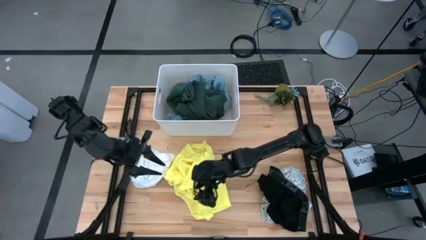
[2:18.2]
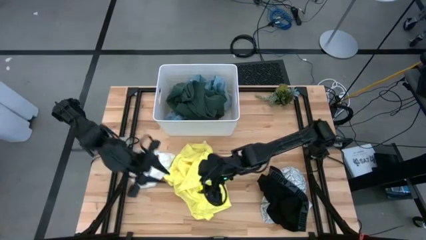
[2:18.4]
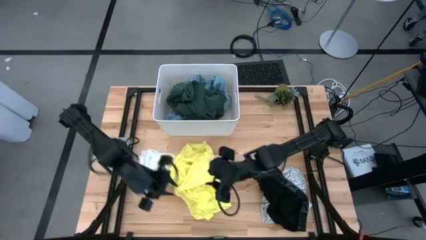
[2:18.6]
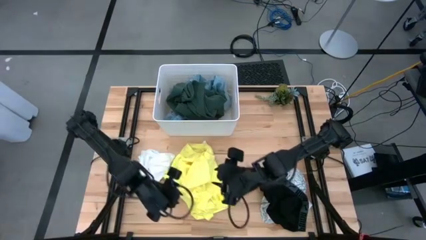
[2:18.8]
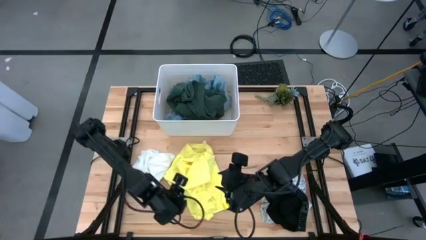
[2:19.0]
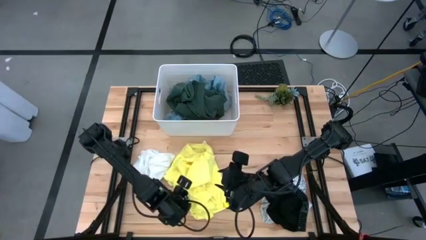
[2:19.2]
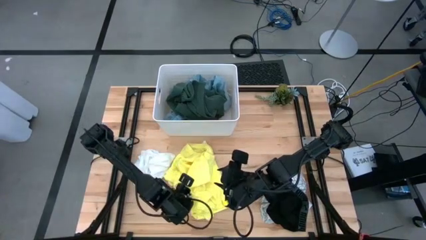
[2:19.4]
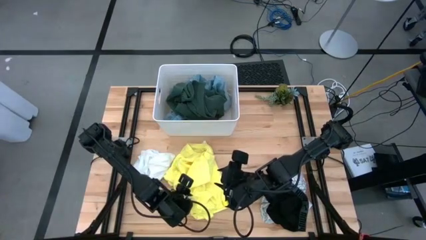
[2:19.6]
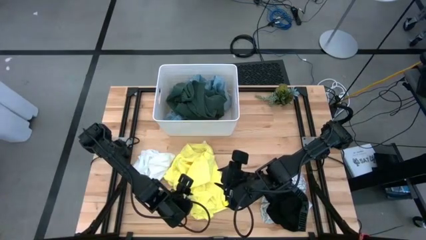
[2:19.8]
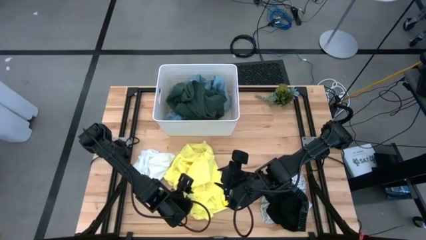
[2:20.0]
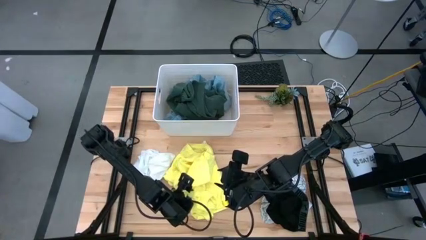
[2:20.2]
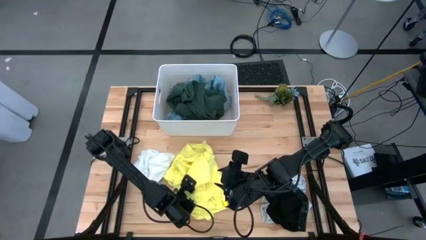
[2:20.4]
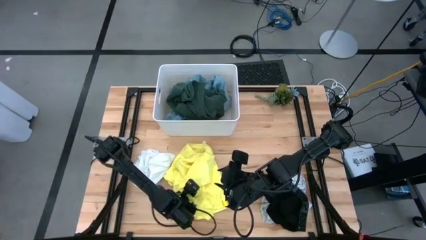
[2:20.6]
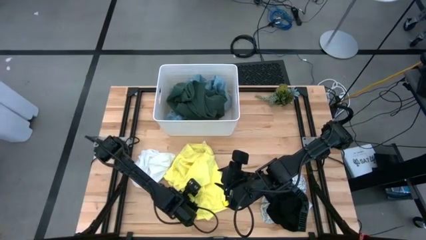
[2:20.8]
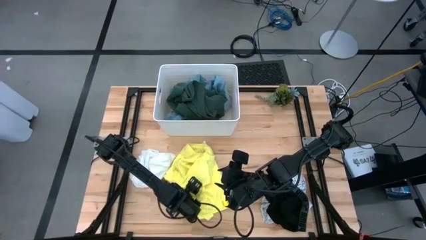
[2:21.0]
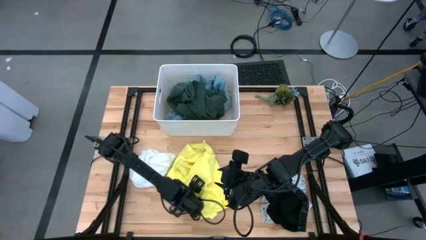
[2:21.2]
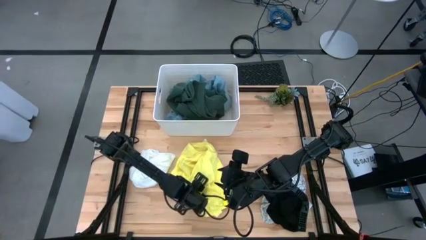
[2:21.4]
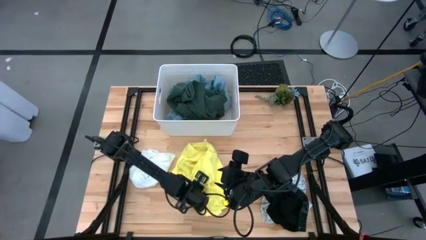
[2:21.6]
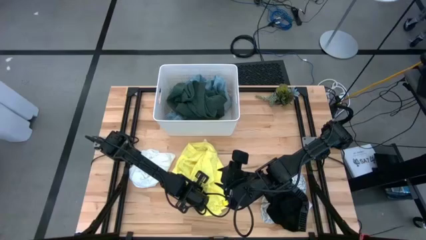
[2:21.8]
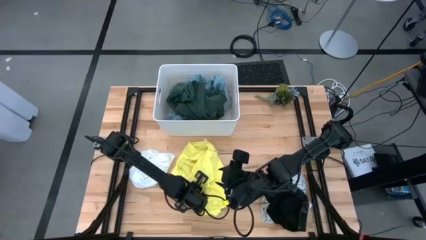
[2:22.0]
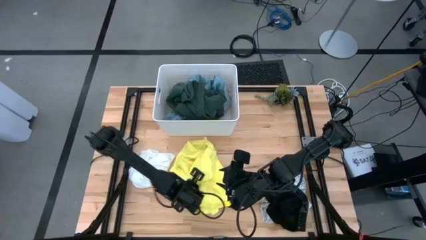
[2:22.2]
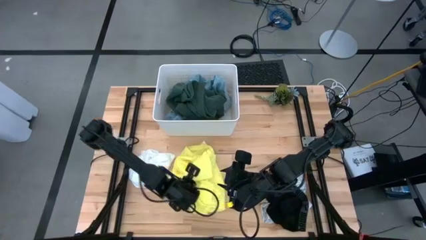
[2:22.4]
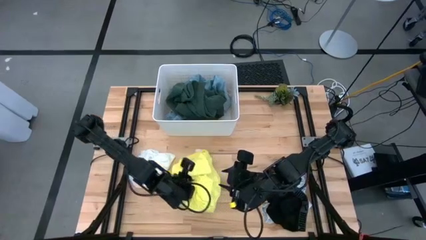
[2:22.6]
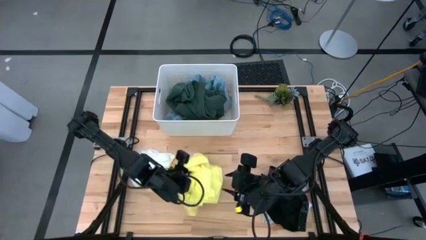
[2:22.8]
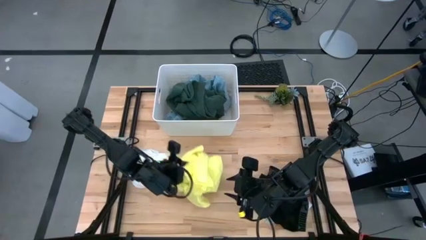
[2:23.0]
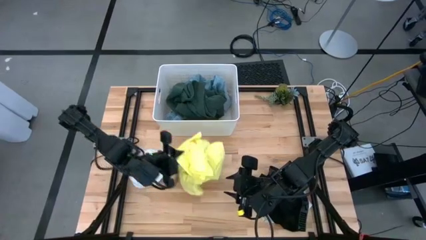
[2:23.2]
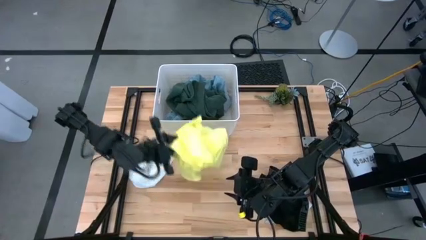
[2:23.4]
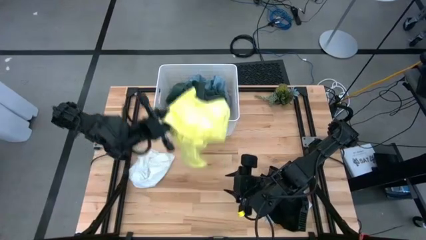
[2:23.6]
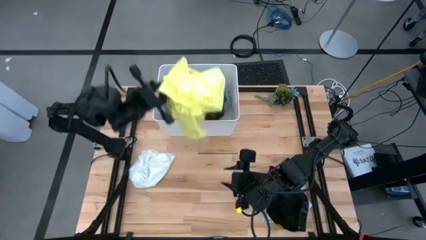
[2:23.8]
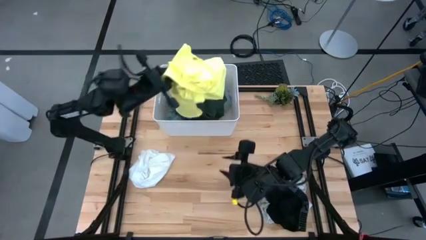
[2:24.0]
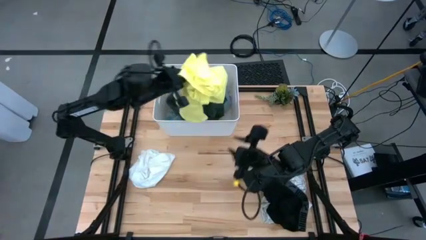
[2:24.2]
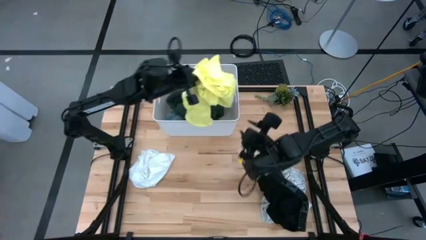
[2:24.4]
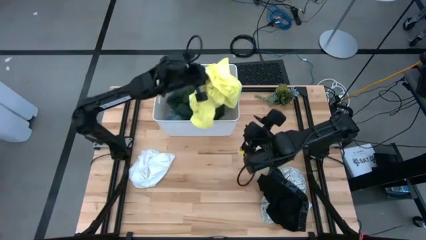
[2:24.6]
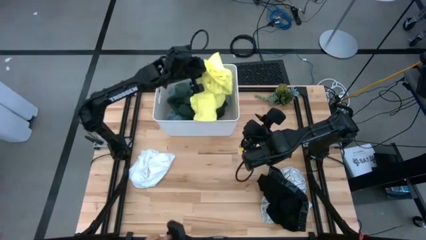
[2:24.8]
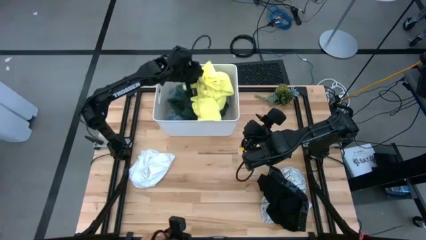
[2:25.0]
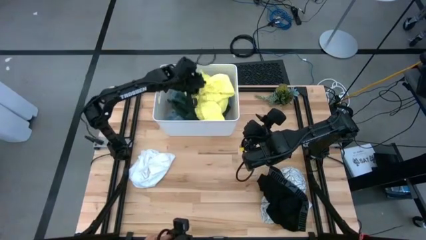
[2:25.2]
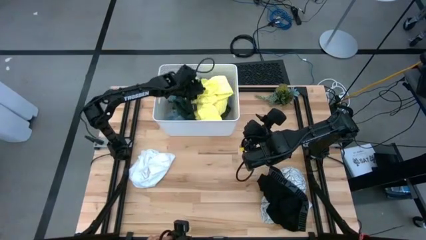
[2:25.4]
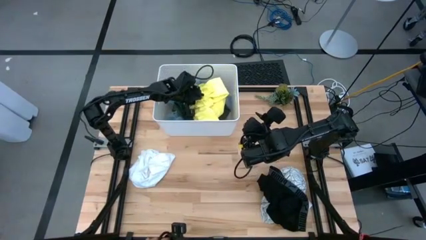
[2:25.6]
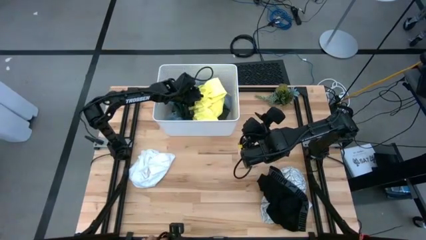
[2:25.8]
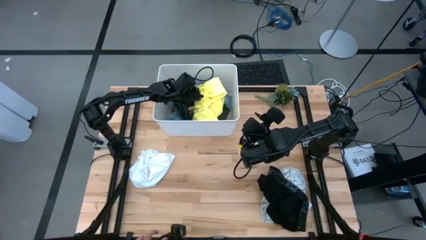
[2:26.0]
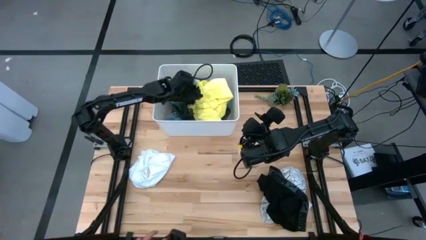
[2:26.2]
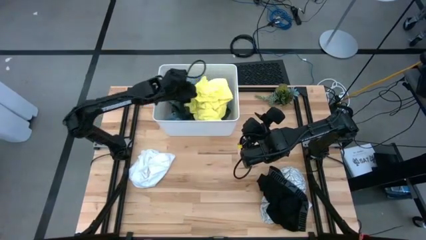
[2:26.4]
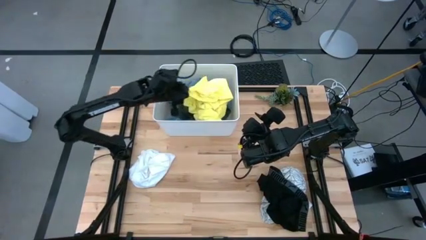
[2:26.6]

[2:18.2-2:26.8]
Task: Fold laundry
Put the folded yellow shirt into the white laundry bin

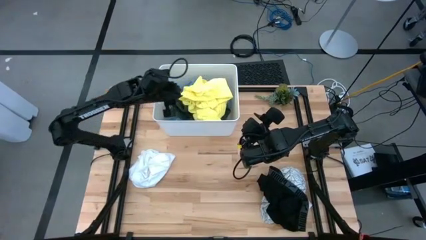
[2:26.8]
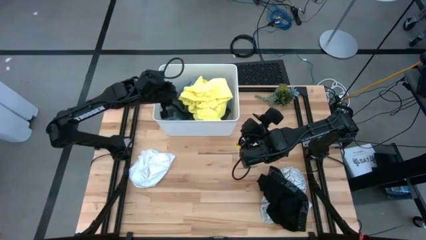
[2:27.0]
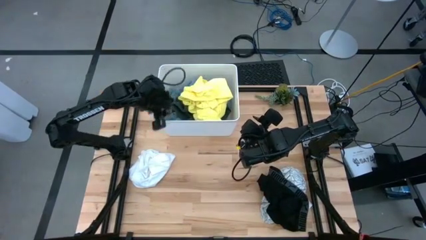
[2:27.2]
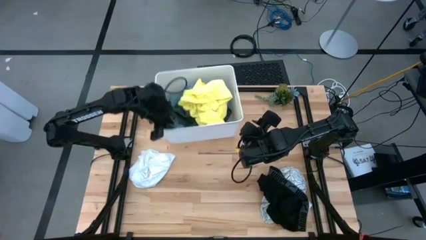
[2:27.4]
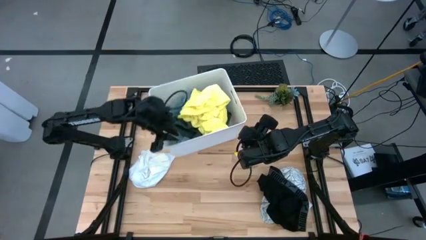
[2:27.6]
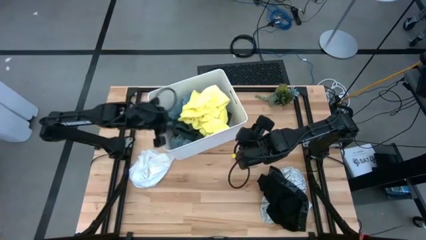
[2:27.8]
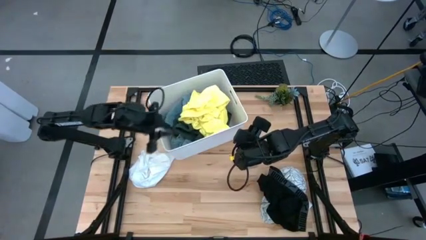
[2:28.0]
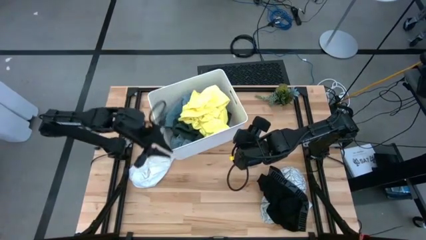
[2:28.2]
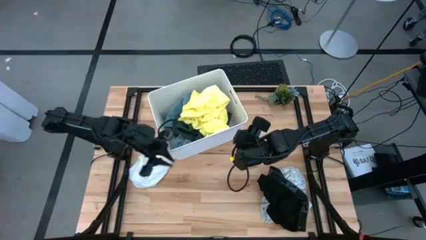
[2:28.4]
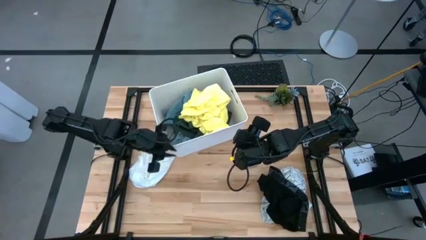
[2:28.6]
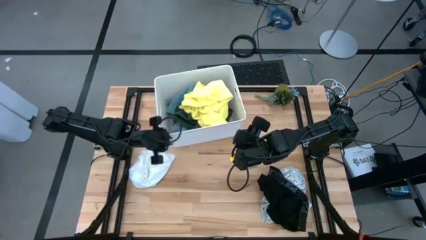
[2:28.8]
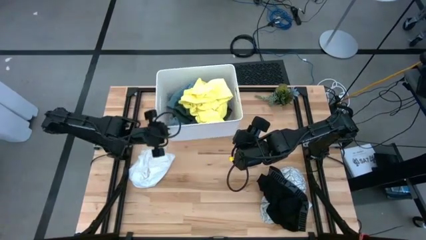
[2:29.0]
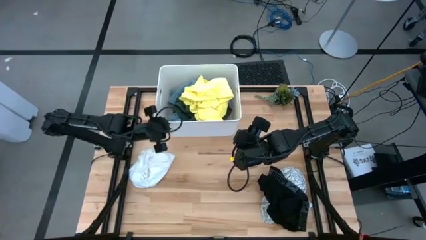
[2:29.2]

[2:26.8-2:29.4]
Adjust the white laundry bin

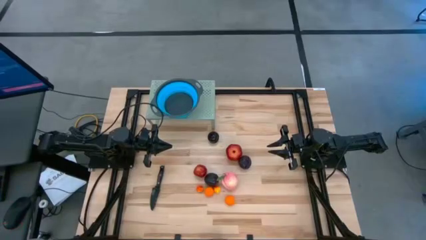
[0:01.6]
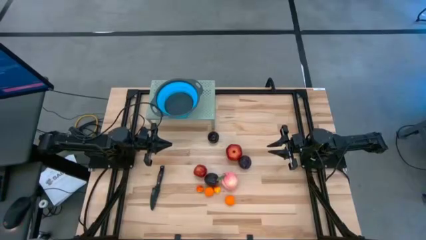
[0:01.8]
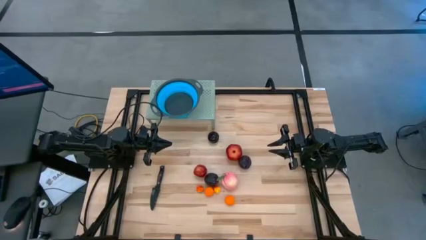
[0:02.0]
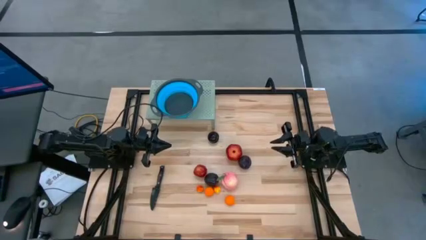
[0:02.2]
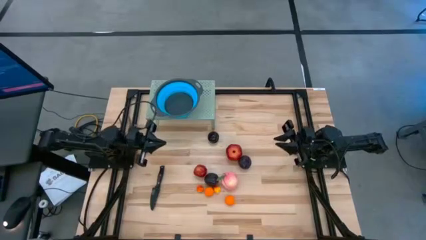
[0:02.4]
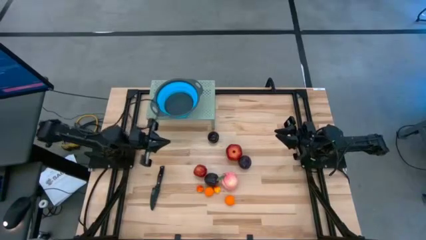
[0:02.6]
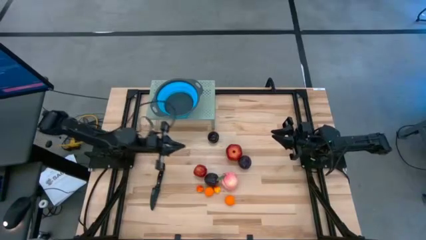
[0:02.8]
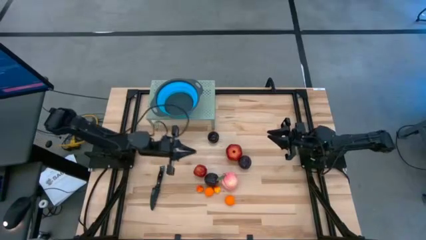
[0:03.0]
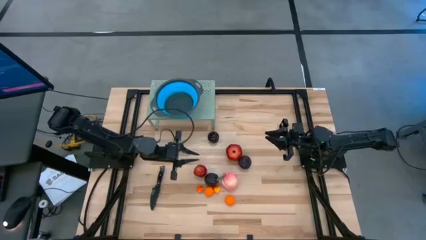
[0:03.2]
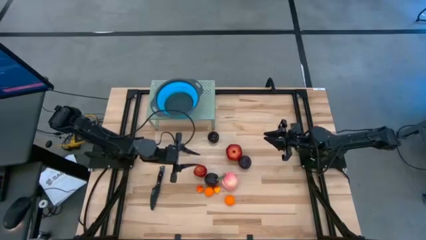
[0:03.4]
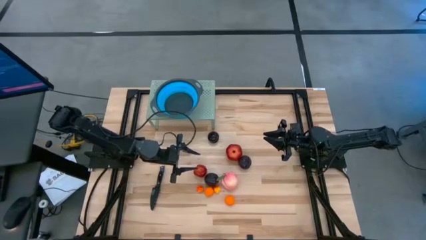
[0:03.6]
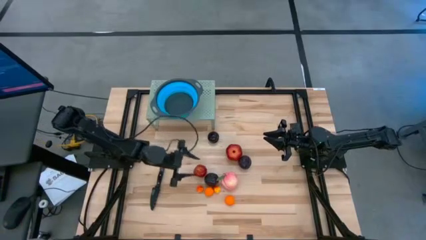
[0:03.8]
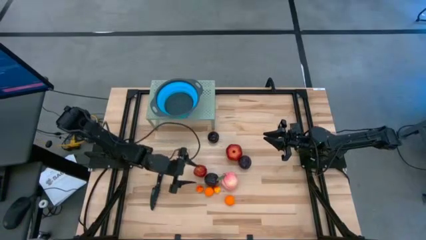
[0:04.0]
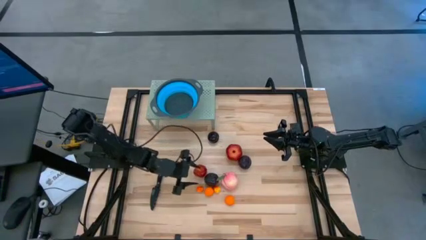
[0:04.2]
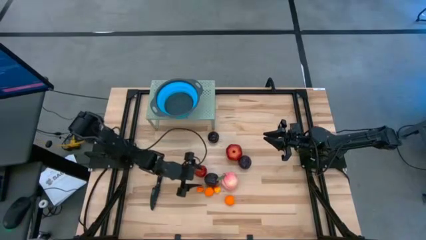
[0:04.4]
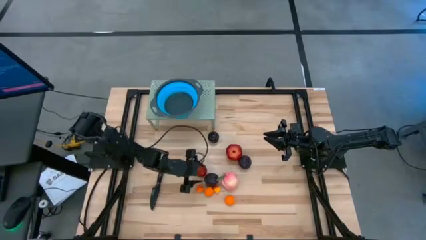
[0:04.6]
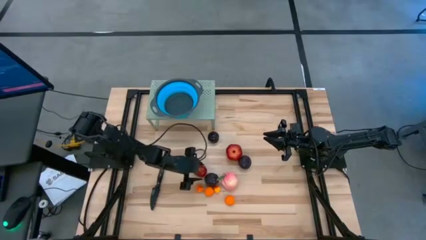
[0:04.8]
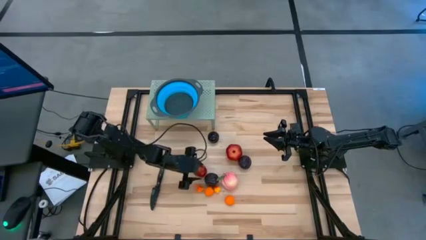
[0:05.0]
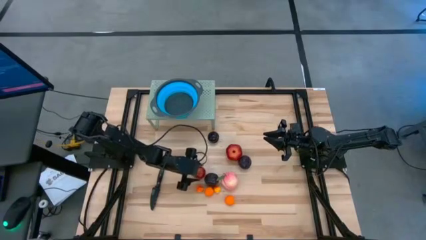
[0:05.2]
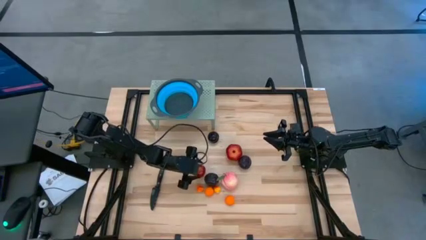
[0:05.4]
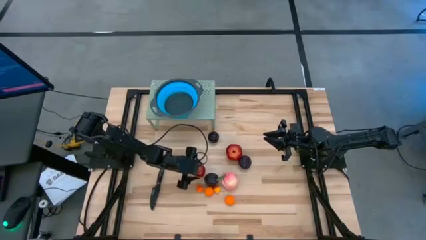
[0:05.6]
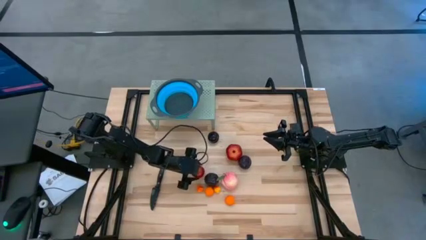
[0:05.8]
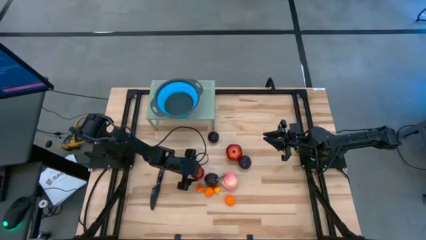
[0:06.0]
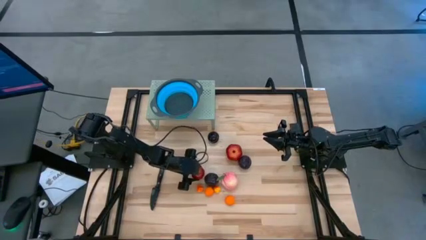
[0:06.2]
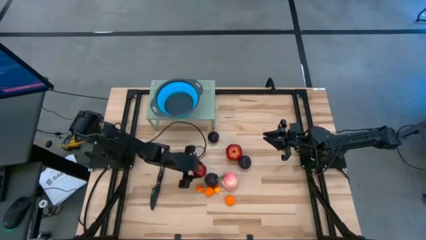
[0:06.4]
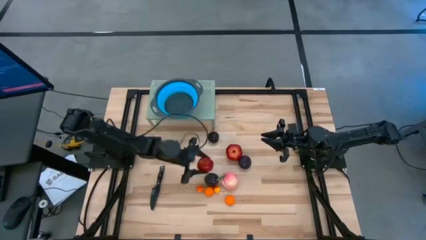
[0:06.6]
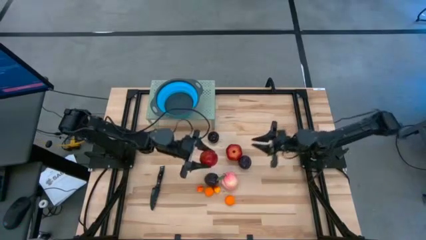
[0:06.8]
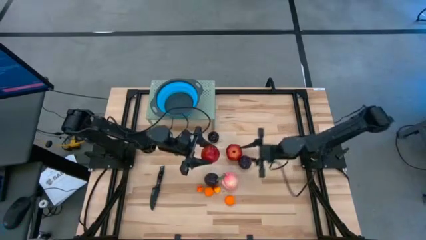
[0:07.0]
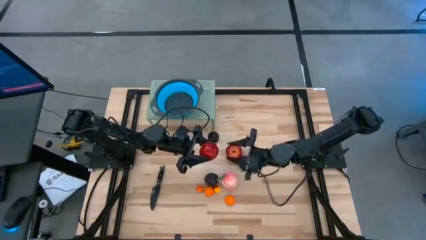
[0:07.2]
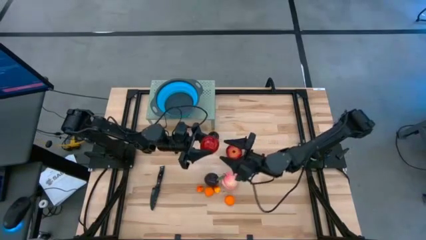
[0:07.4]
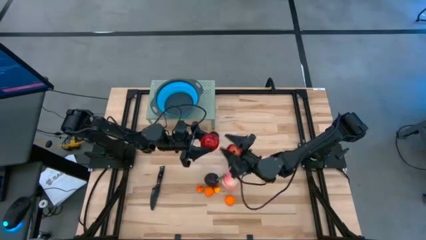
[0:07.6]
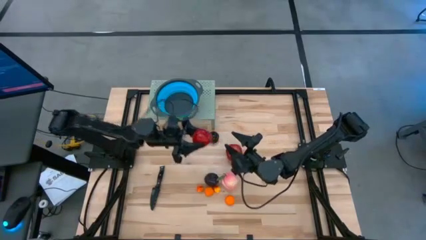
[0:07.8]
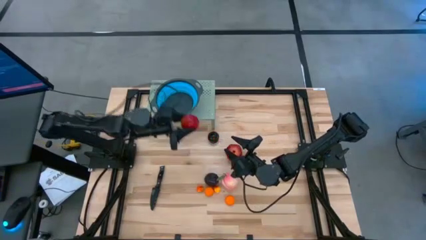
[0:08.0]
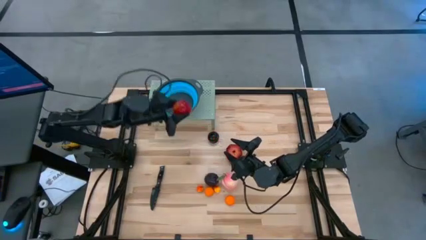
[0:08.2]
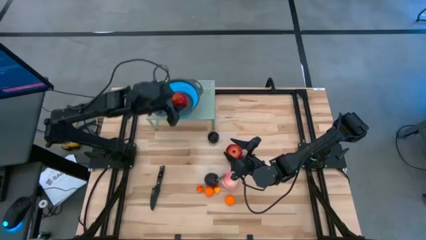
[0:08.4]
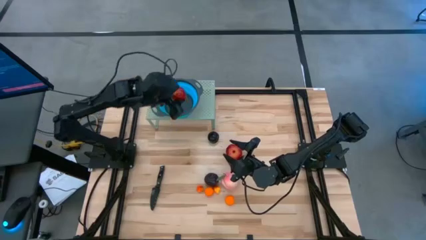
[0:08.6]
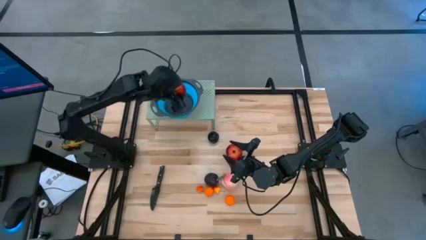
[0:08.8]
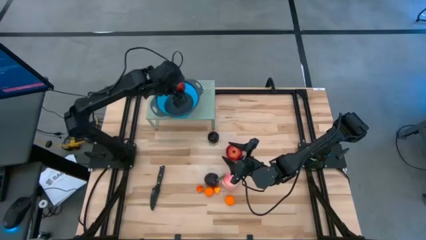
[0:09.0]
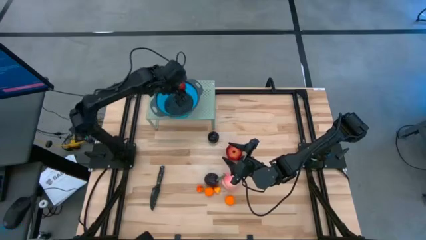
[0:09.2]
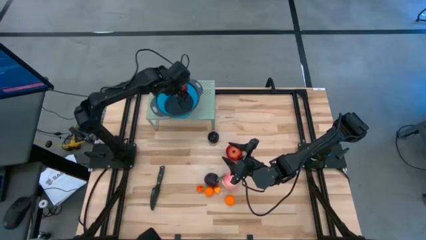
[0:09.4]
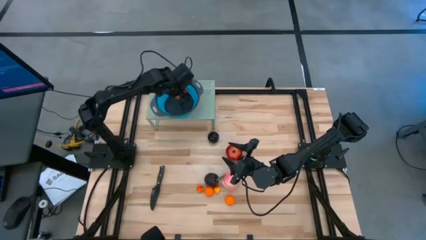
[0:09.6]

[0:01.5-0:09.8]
Task: Pick & Place Fruit
Put the red apple into the blue strainer bowl on the shelf
